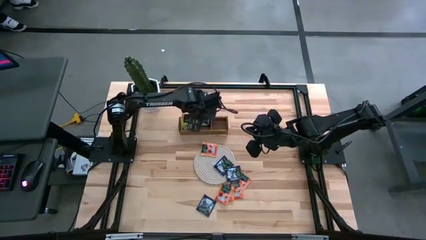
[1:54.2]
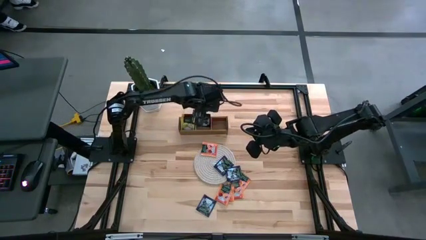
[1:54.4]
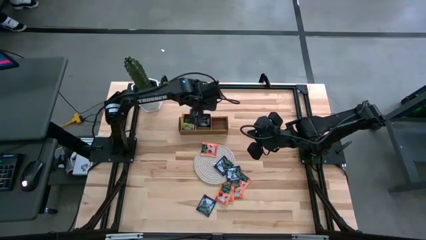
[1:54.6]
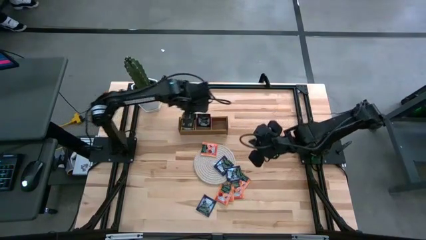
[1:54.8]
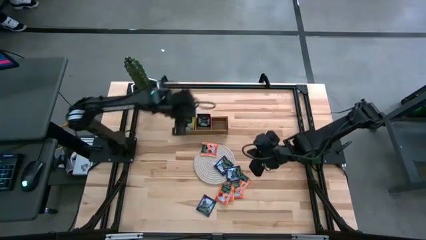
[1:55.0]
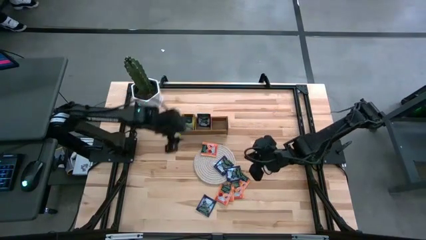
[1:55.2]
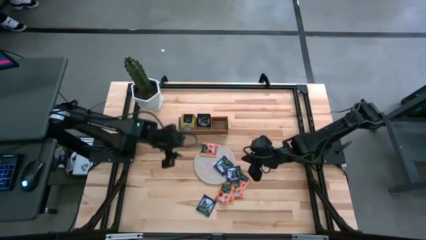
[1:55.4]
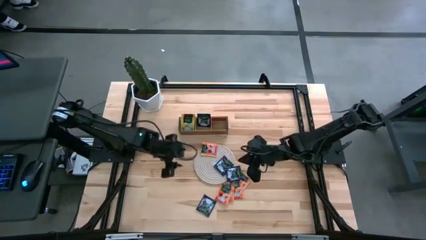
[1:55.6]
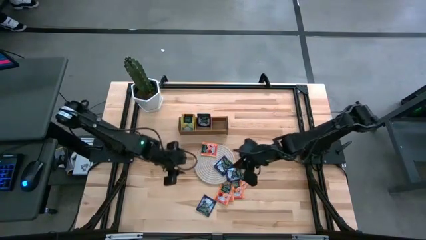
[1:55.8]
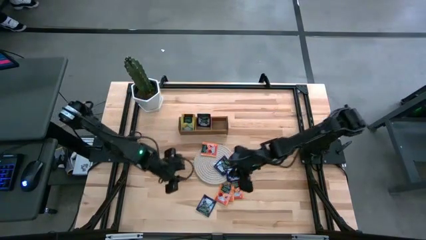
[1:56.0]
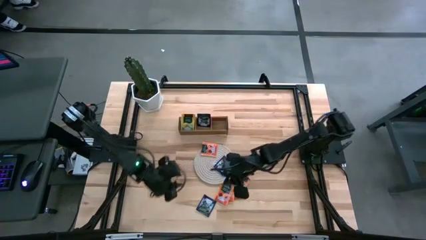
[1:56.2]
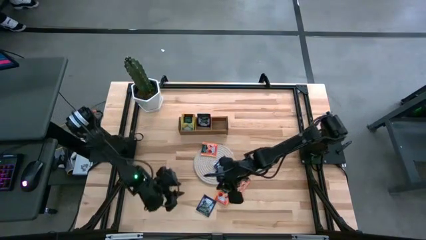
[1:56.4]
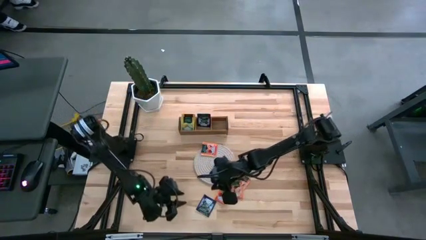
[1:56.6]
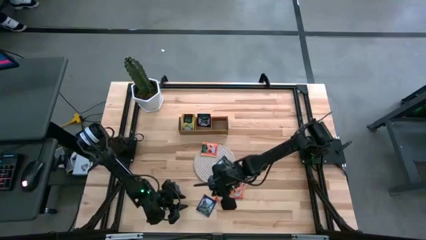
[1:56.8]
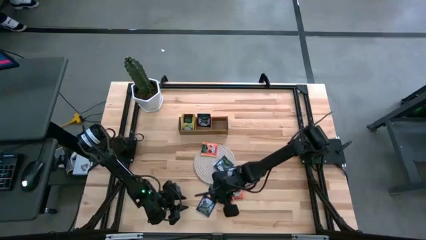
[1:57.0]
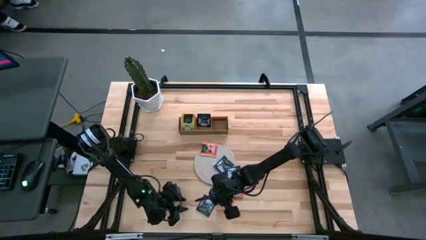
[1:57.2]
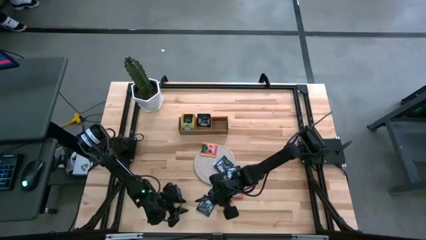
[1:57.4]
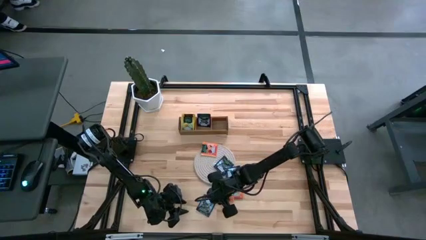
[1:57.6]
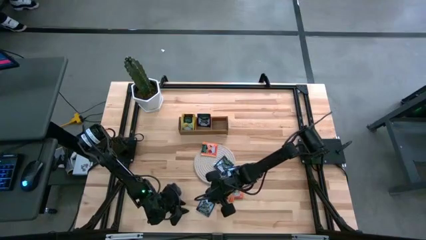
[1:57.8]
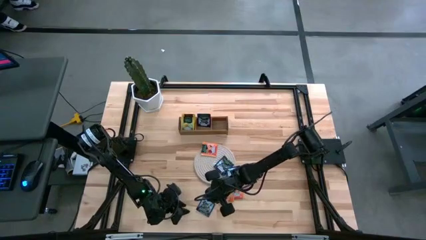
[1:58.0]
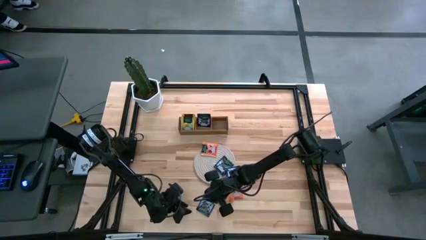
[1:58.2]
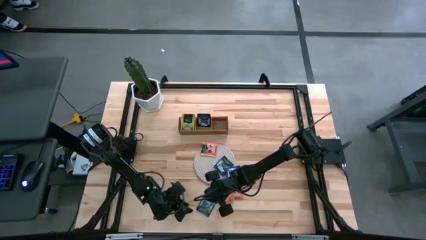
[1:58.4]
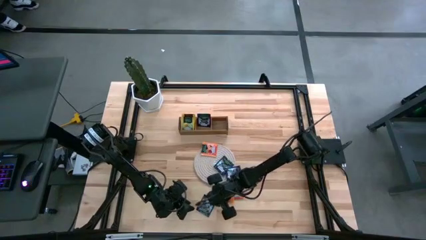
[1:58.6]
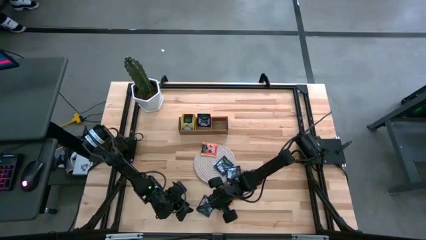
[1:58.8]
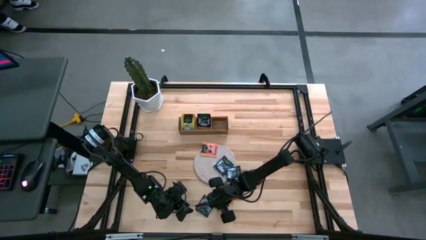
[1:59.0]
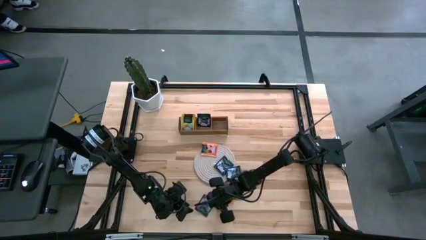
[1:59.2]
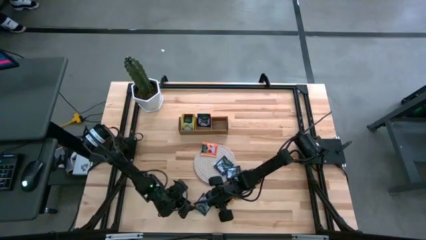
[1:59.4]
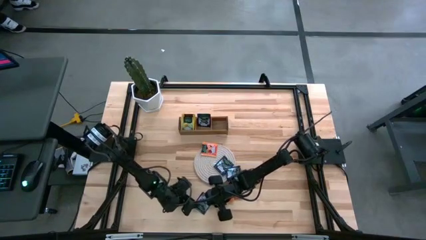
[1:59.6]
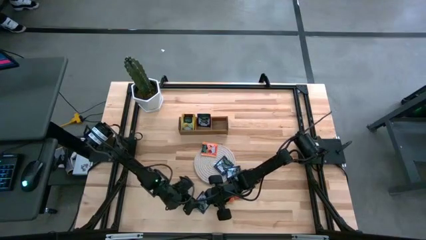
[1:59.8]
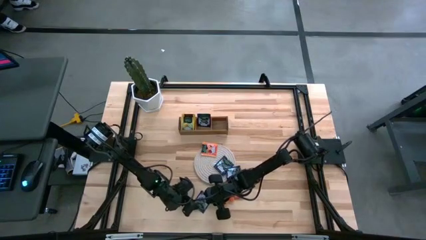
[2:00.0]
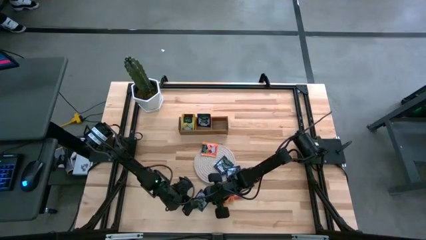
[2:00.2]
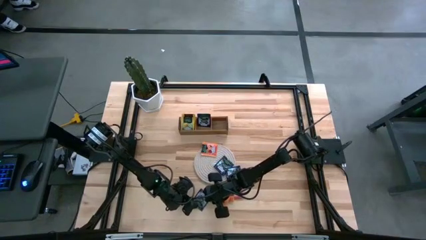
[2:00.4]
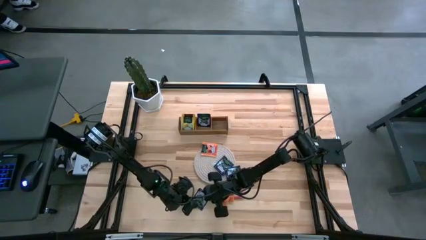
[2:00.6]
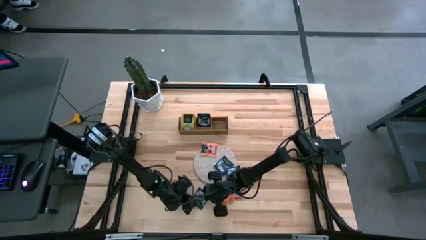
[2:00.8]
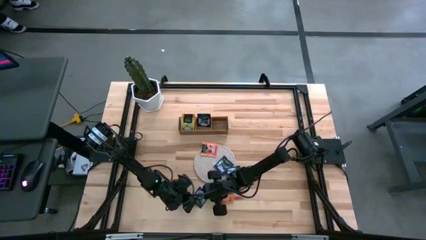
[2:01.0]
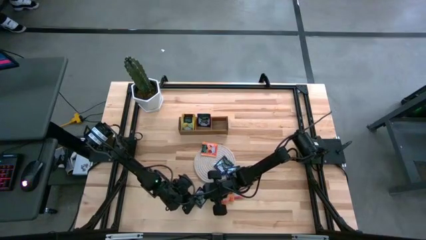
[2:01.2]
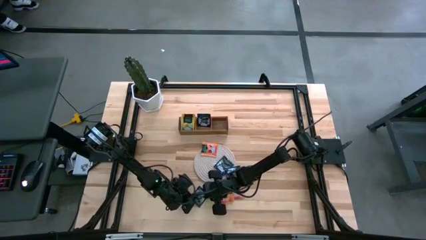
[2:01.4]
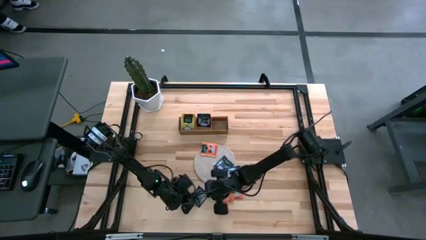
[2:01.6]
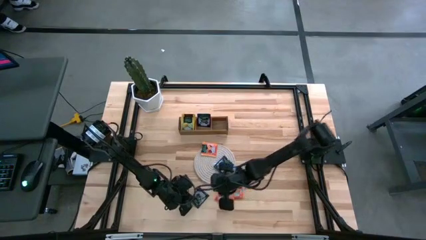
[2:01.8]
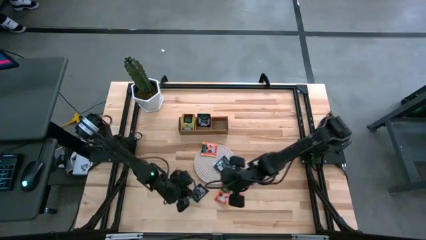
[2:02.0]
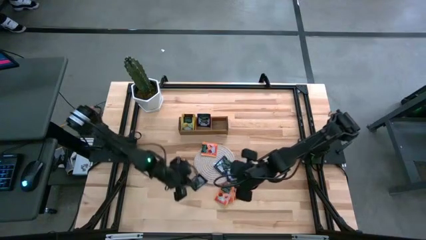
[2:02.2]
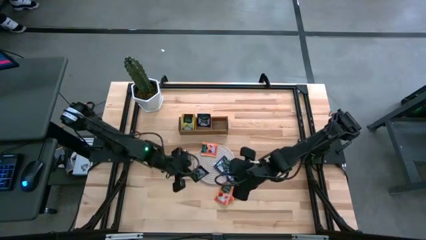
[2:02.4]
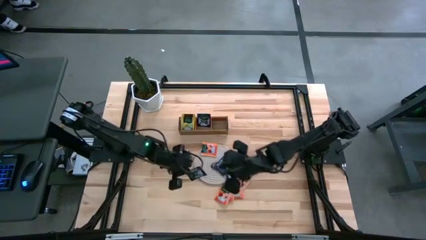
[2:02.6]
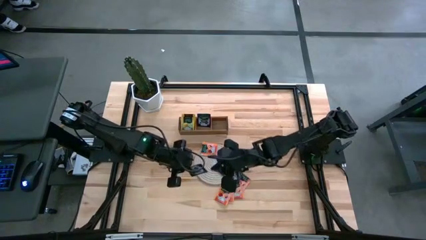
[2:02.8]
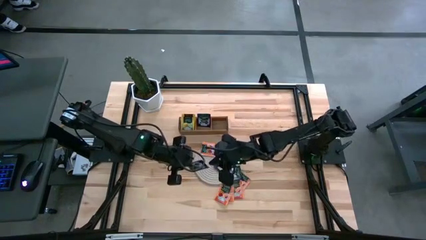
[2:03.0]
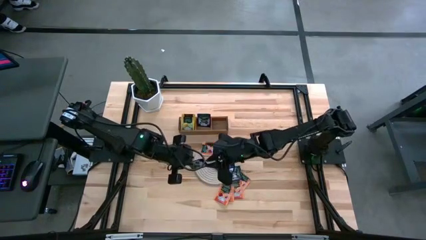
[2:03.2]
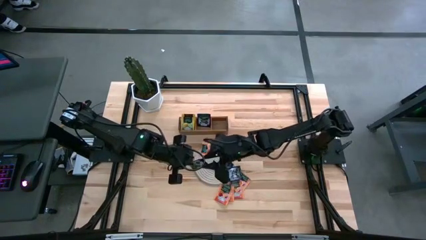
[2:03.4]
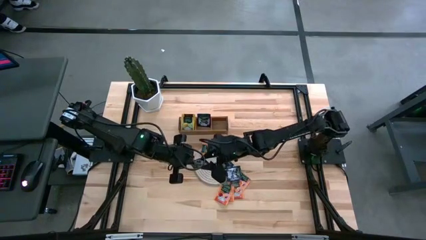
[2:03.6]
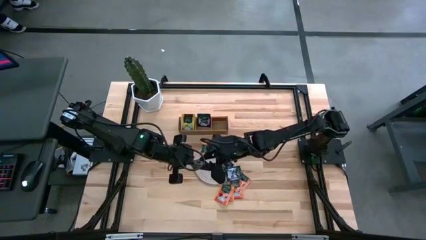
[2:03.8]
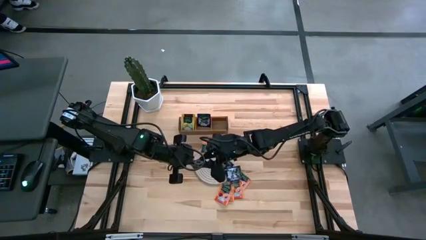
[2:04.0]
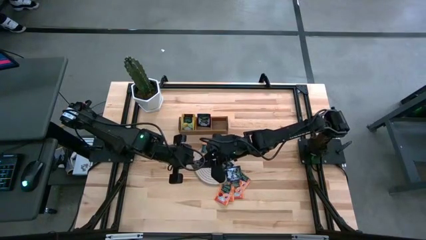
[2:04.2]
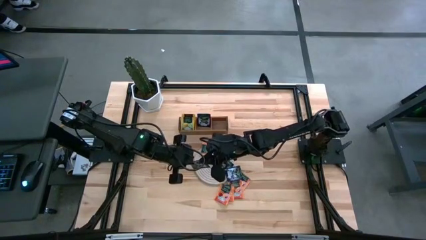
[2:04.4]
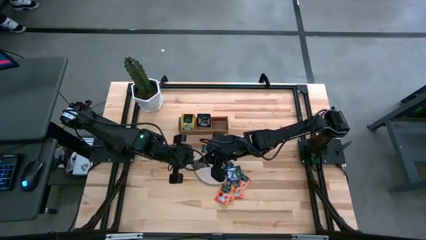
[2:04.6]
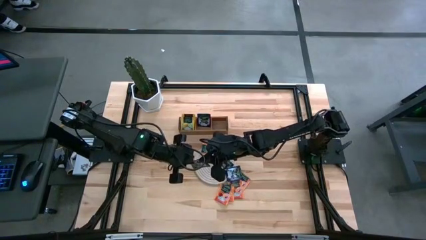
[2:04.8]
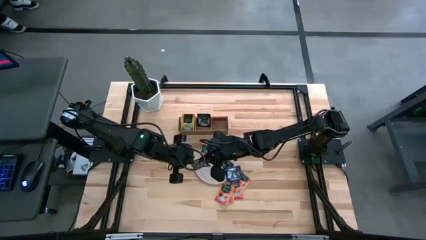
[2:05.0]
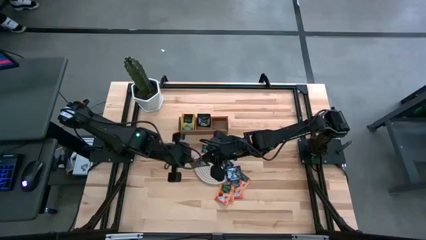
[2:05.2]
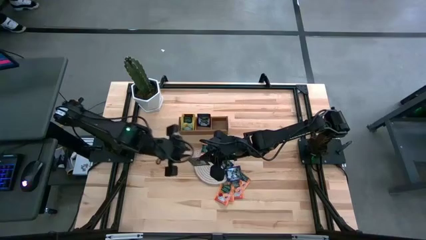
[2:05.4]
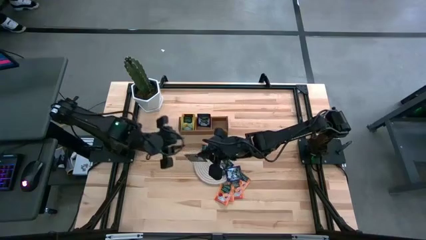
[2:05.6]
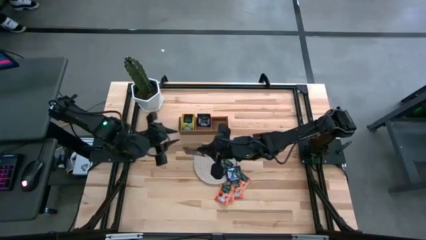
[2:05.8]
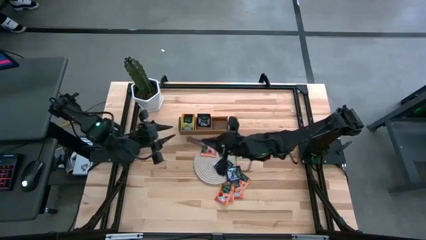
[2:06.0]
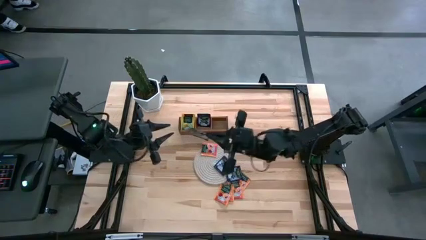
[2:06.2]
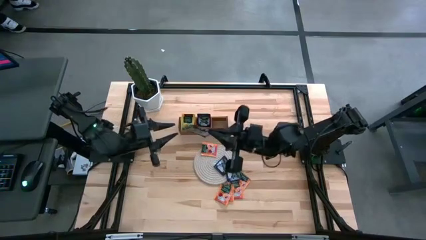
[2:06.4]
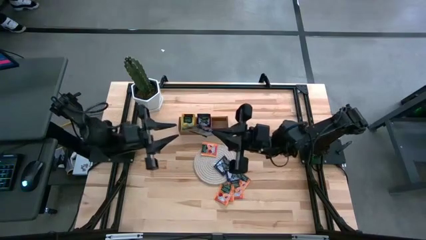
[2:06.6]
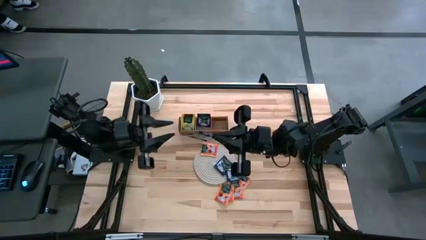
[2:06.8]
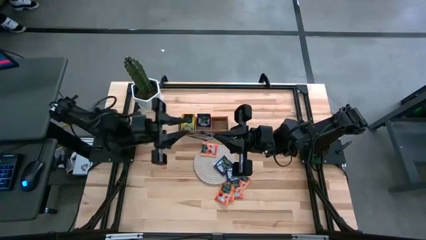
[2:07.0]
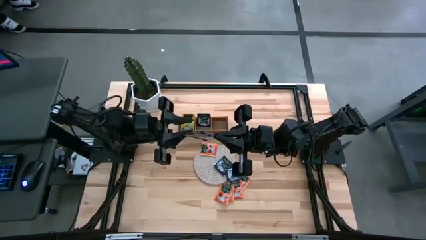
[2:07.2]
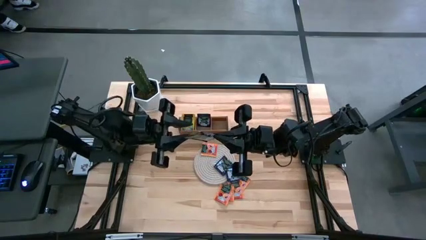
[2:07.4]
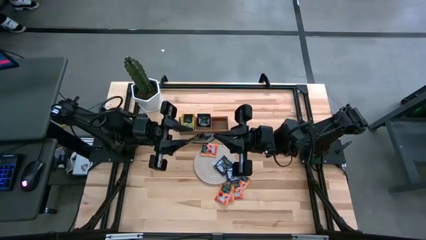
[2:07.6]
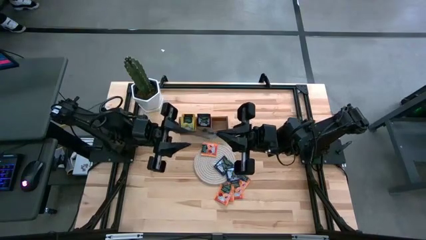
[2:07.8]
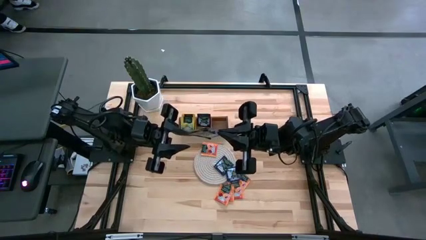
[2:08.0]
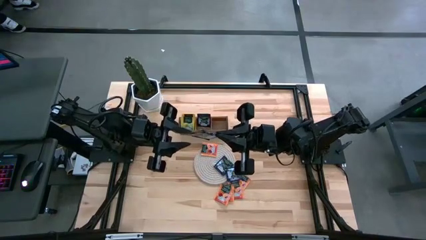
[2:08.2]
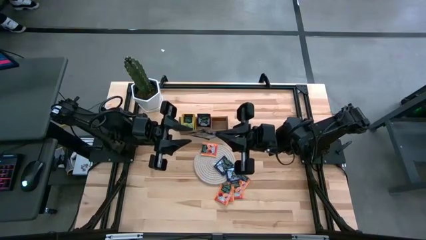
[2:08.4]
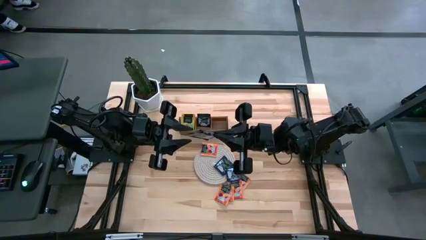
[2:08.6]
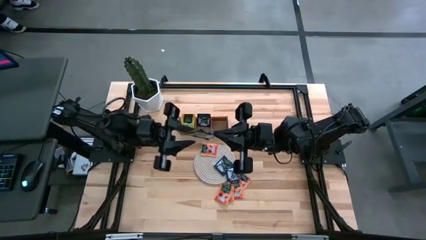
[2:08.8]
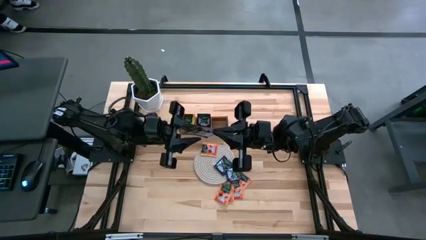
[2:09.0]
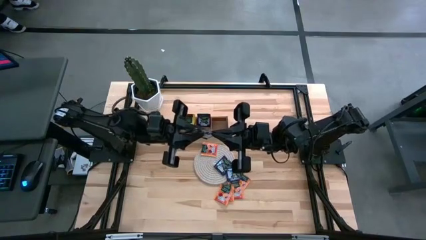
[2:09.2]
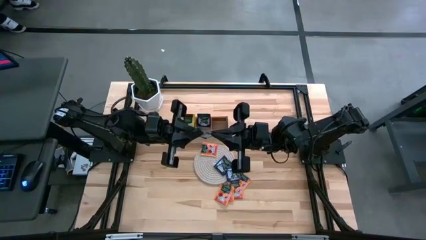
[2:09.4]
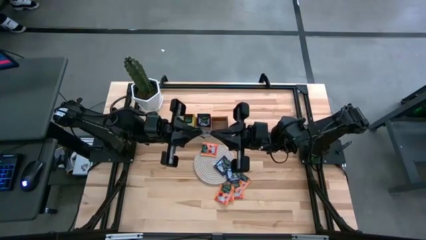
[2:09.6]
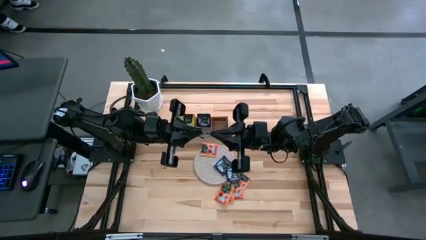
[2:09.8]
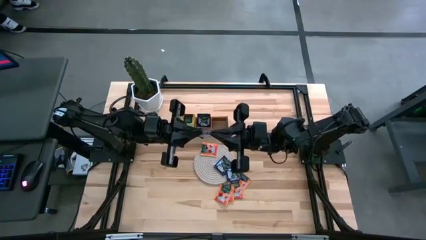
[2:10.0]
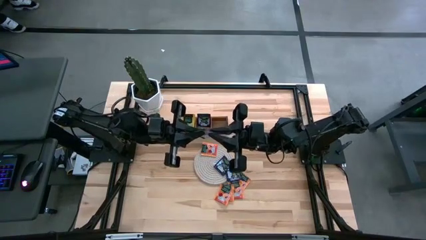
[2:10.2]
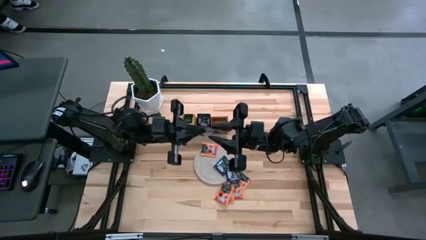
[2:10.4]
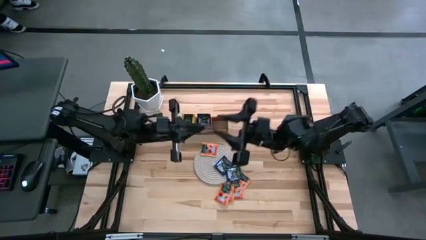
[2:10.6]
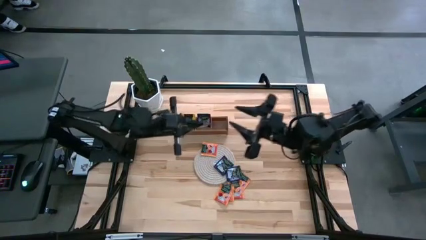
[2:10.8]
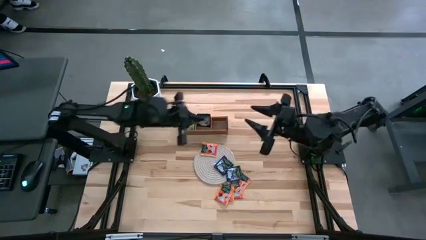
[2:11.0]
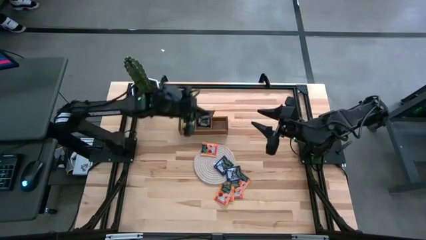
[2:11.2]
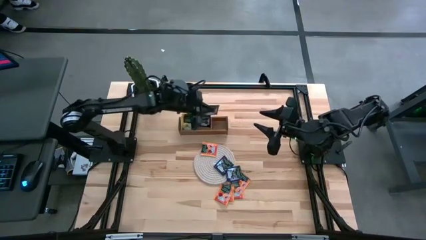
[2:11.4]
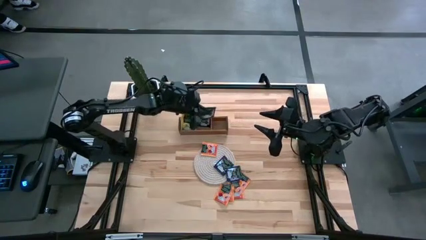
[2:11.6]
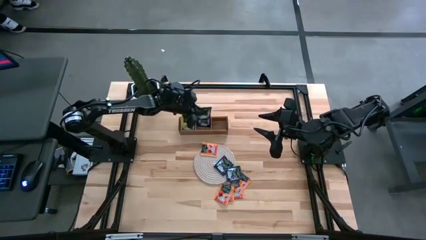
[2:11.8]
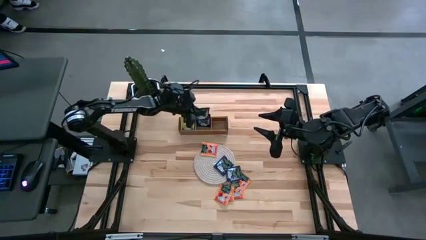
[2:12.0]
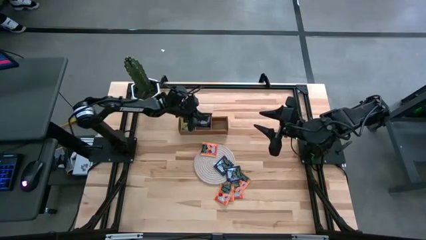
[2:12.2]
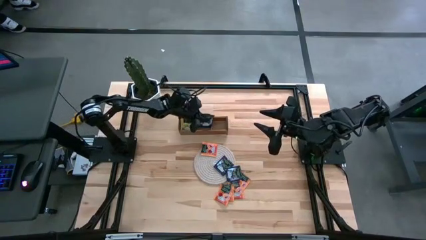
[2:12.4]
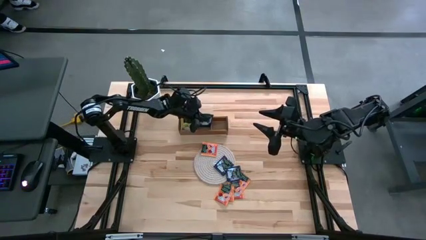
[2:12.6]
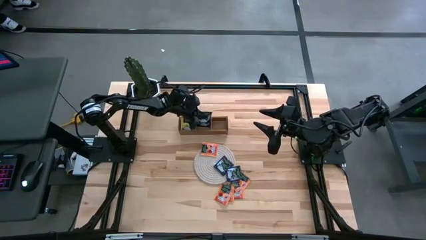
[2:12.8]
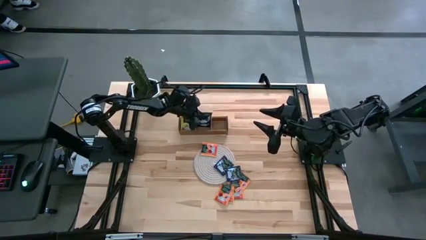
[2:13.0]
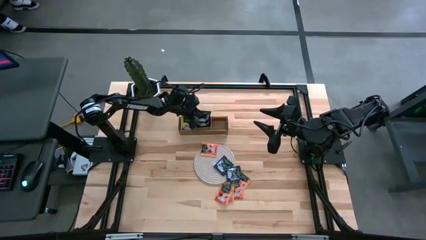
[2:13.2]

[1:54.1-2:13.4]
Task: Pick & Place Tea
Put the purple tea bag into the middle section of the wooden organizer
